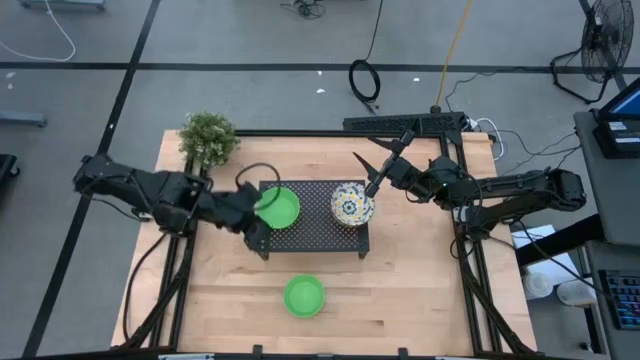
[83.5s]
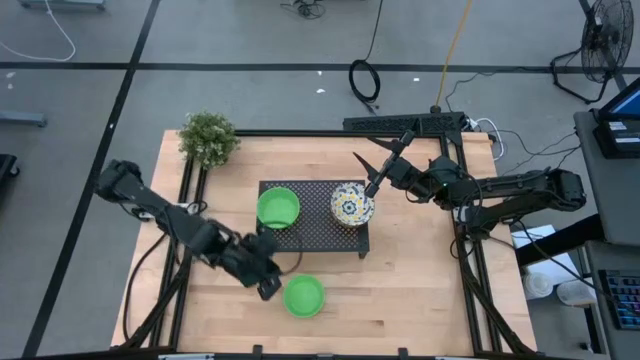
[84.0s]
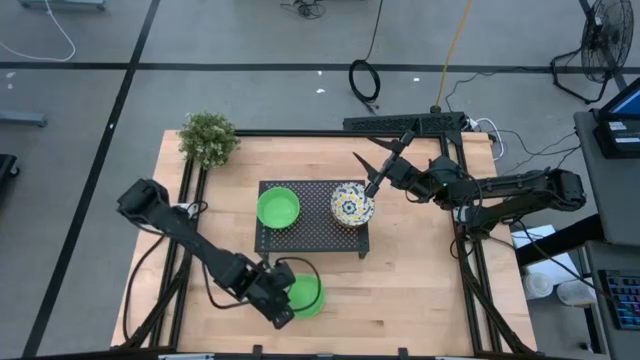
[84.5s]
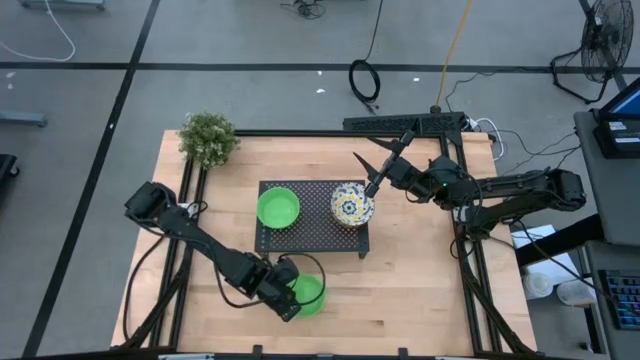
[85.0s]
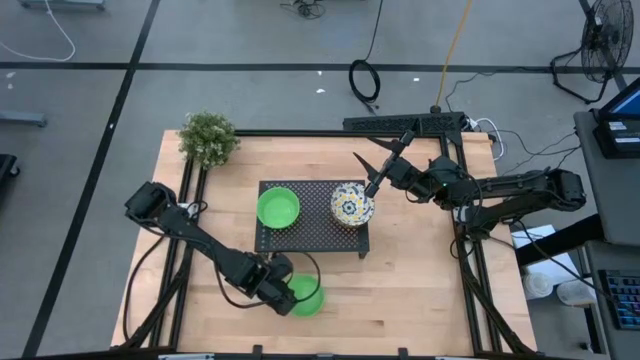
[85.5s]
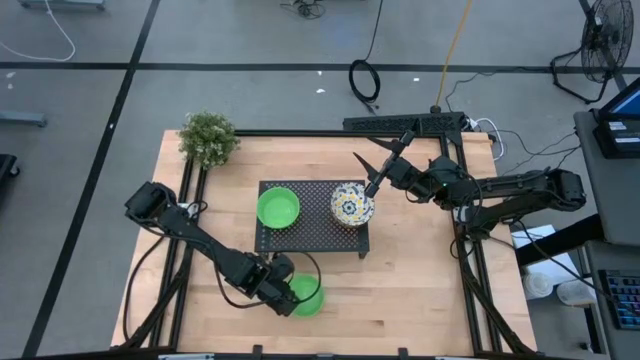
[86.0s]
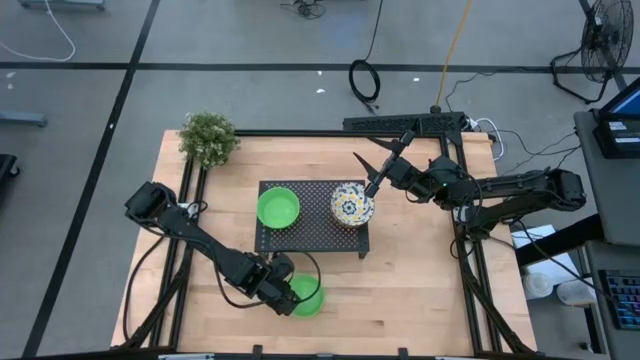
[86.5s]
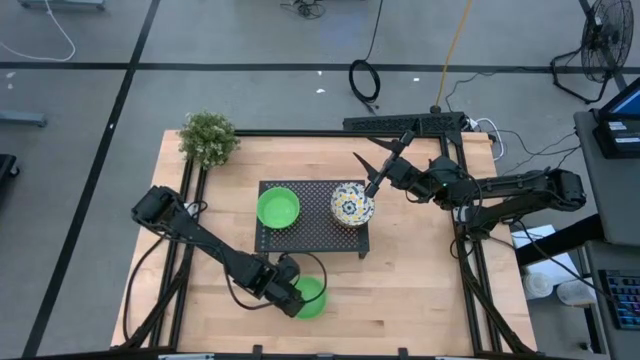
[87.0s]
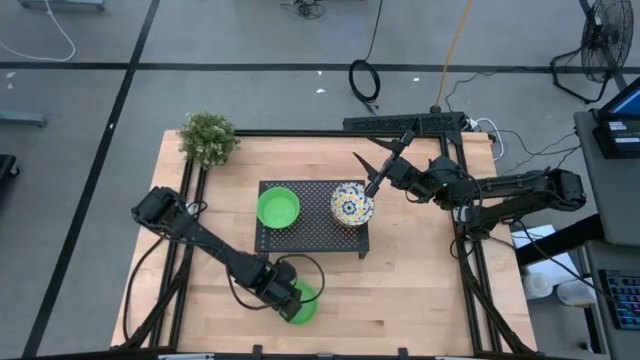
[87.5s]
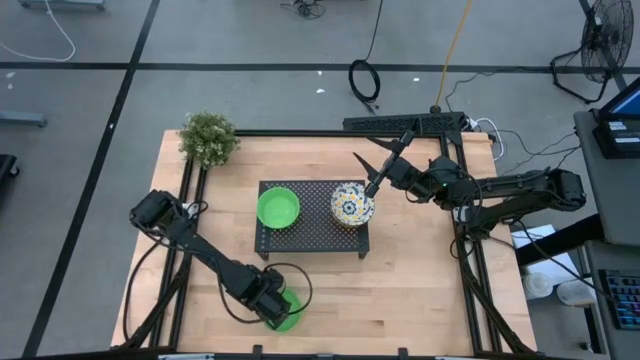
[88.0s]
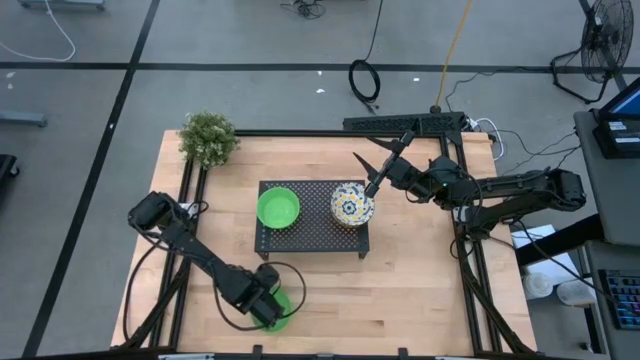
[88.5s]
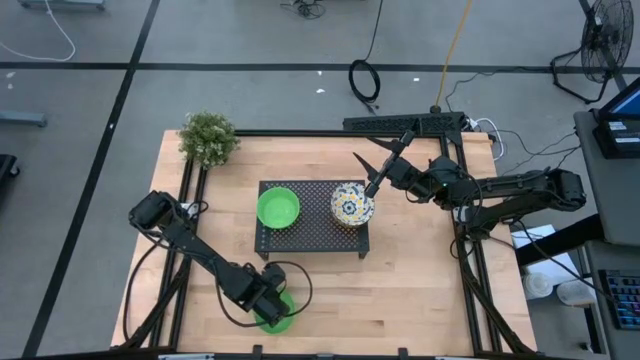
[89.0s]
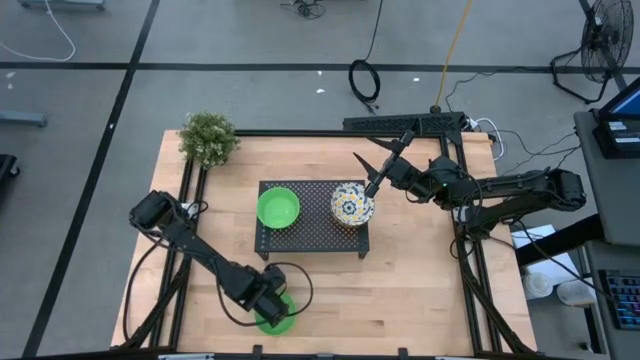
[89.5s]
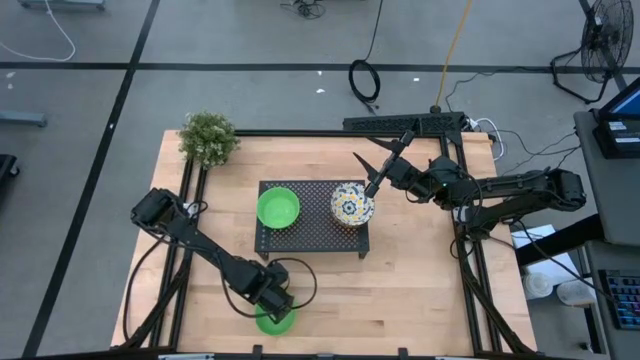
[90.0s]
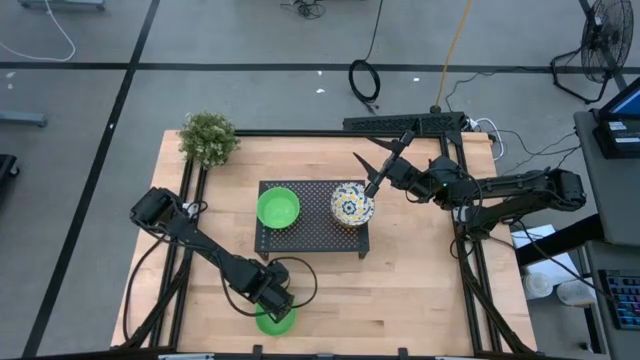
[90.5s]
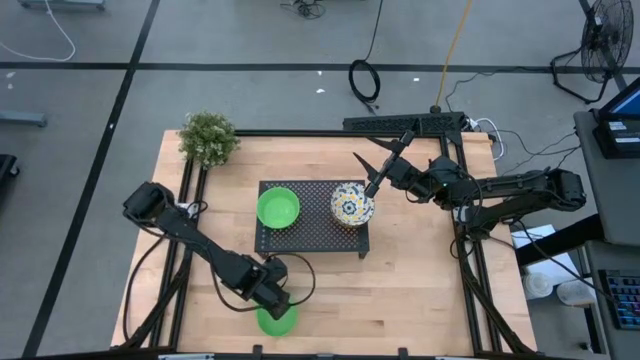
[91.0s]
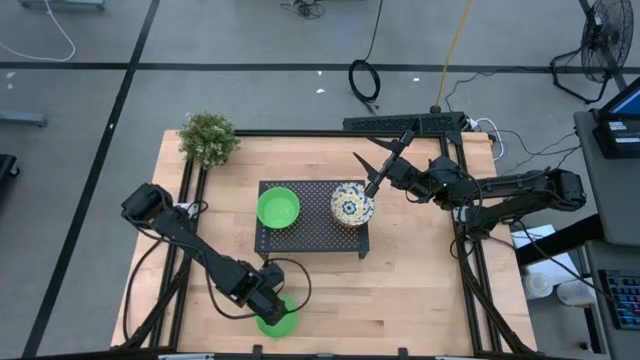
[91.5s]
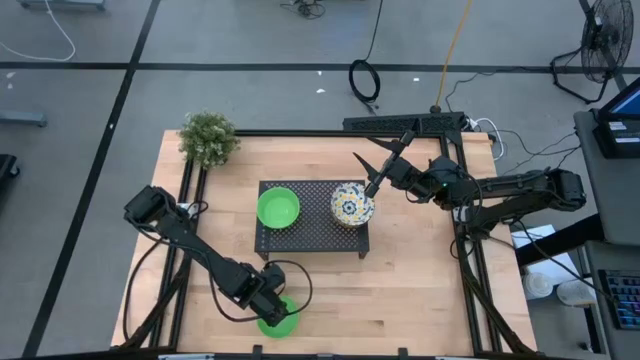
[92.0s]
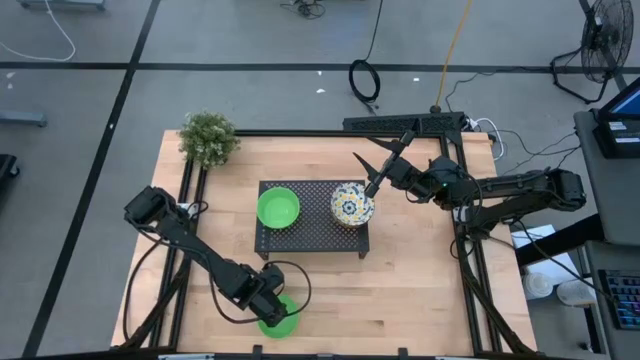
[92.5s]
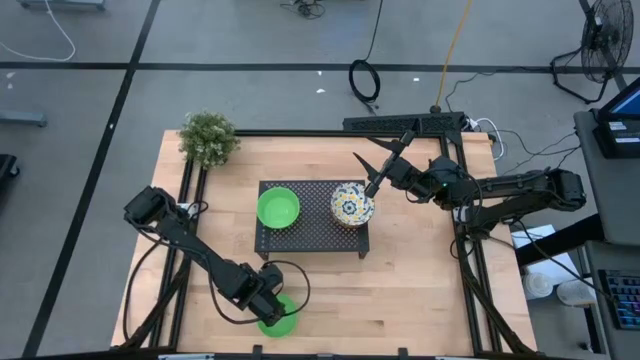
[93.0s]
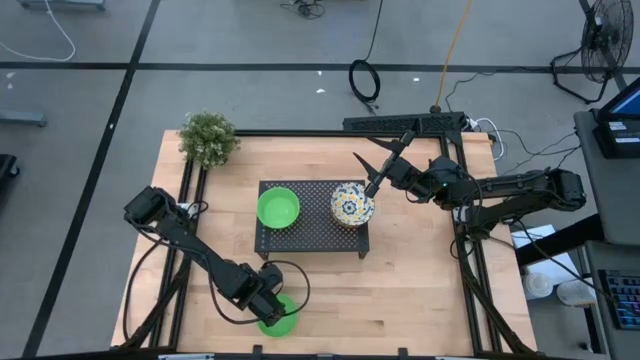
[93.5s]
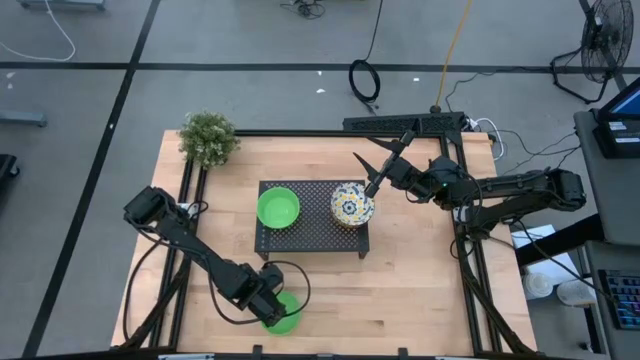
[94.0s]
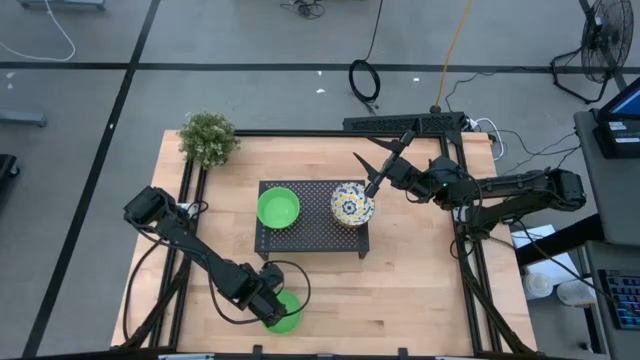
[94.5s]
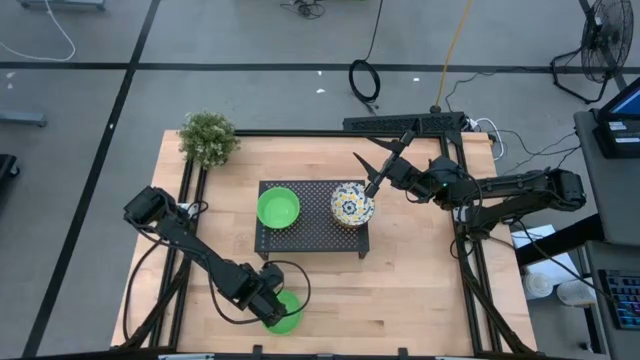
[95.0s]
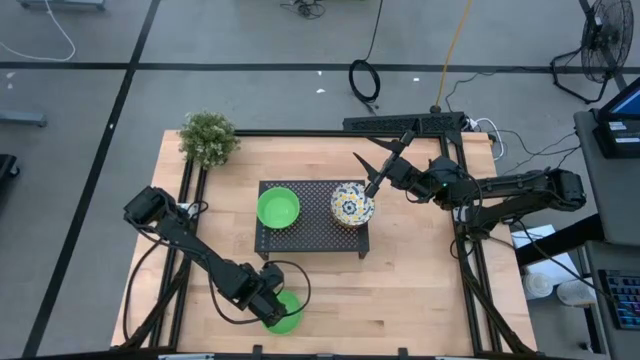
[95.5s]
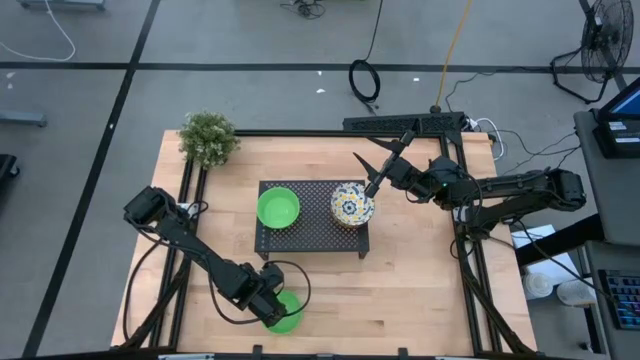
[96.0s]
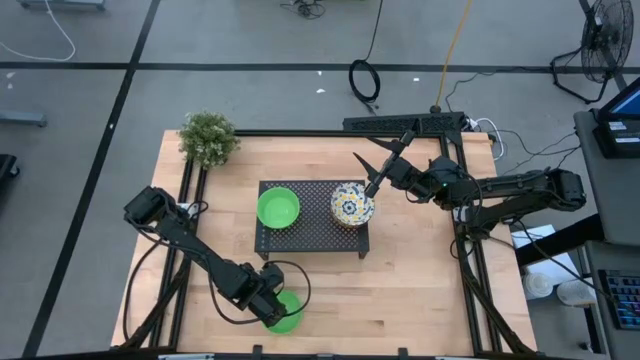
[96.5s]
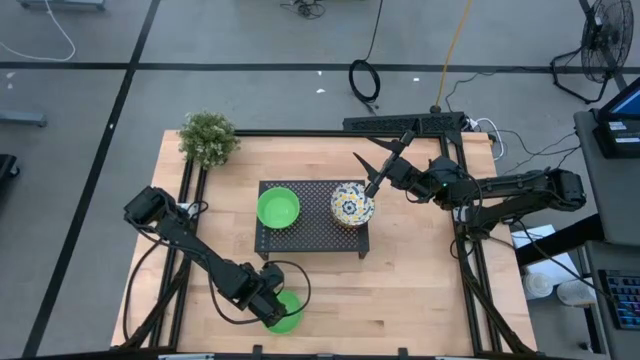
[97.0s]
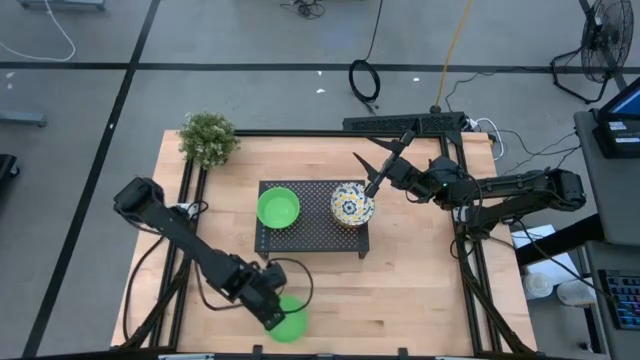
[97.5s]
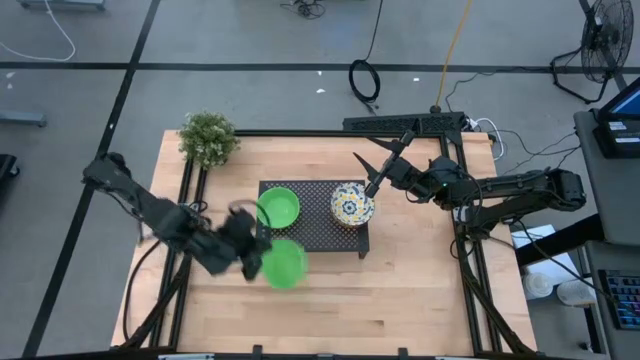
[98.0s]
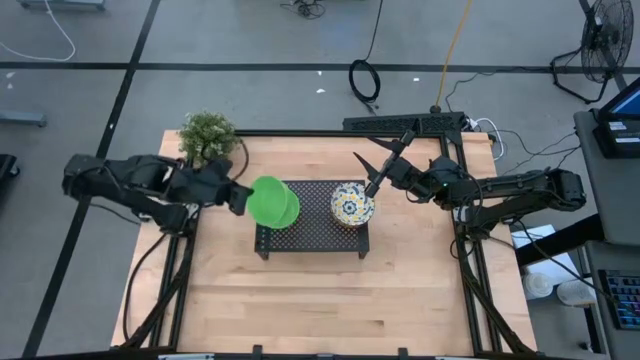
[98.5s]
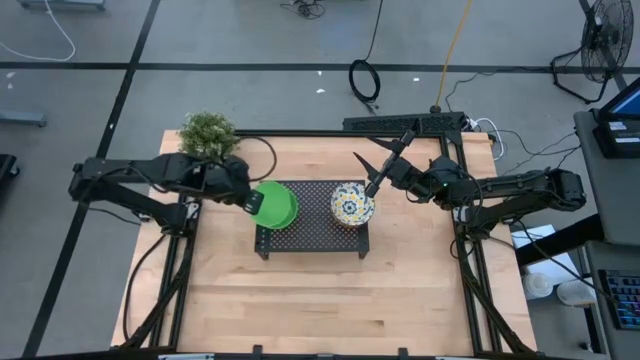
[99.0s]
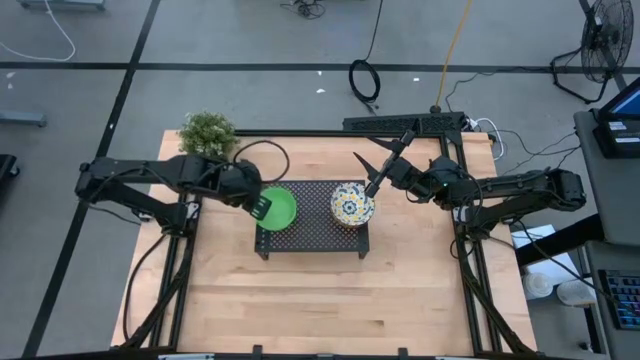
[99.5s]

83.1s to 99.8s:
Task: Pick & Place Mini bowls
Stack the green bowl on top of the green bowl on the shelf

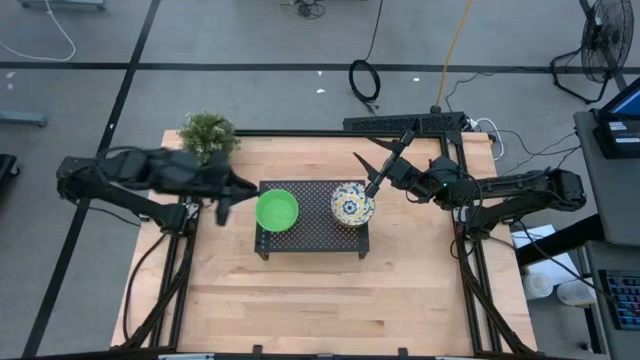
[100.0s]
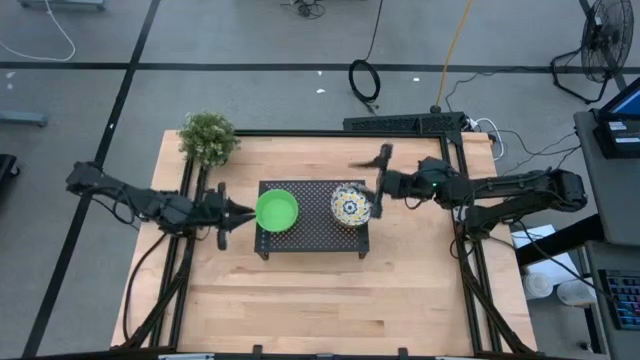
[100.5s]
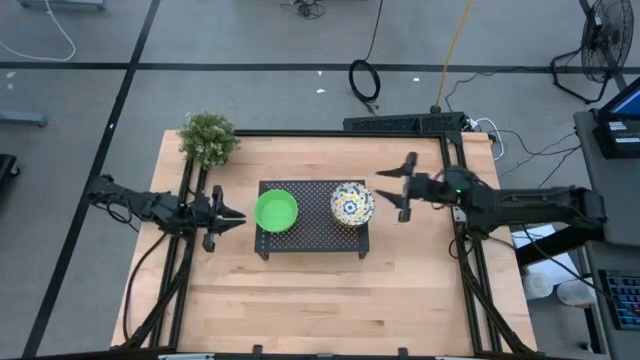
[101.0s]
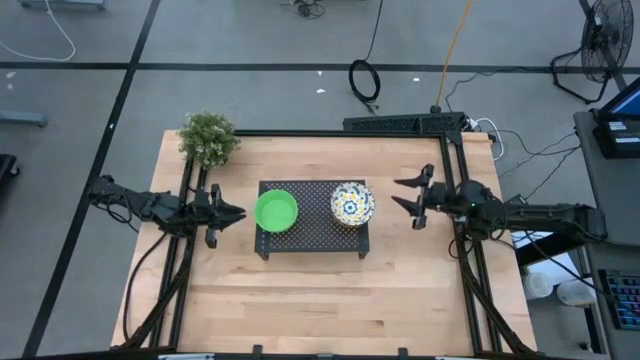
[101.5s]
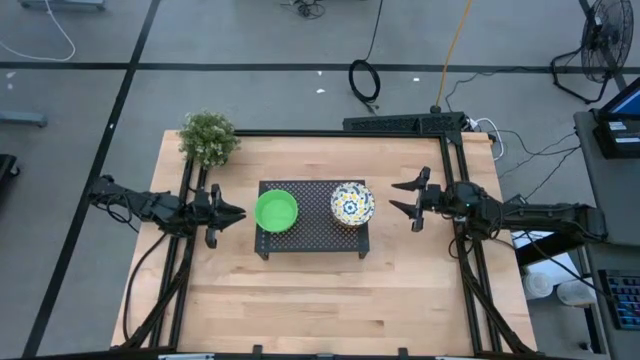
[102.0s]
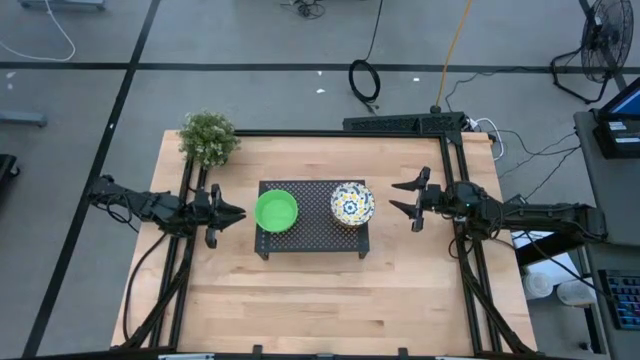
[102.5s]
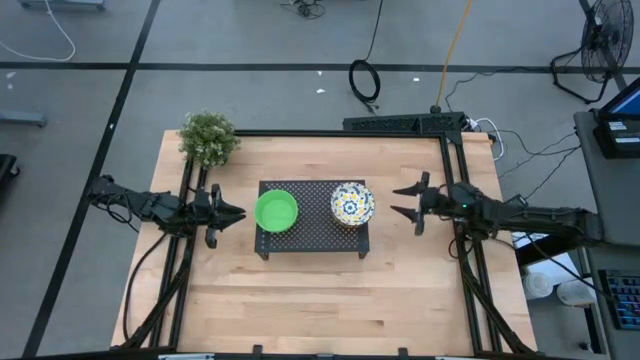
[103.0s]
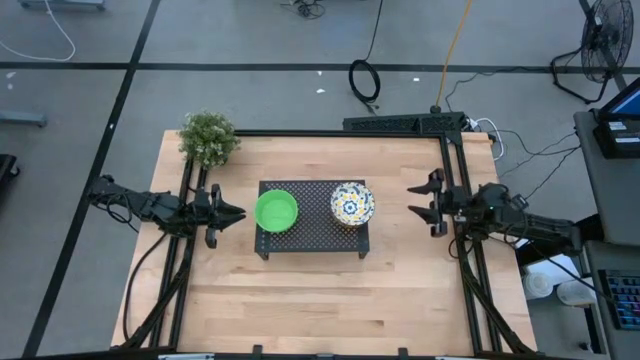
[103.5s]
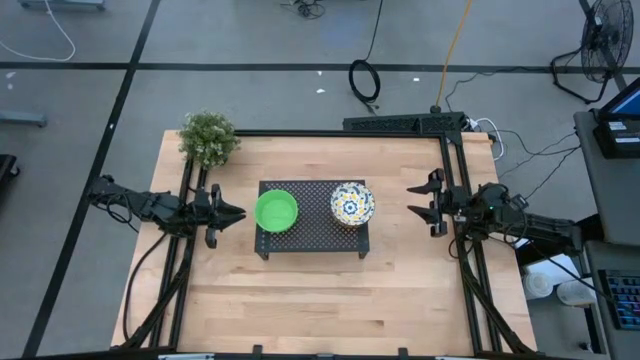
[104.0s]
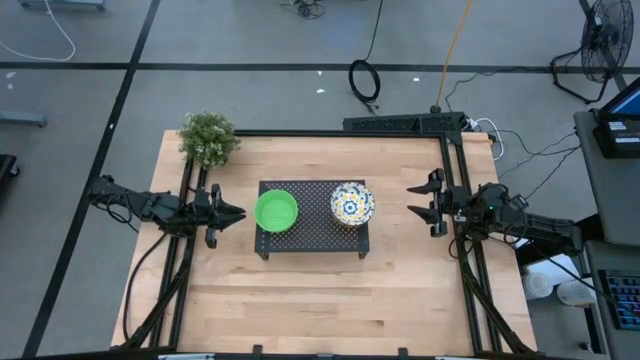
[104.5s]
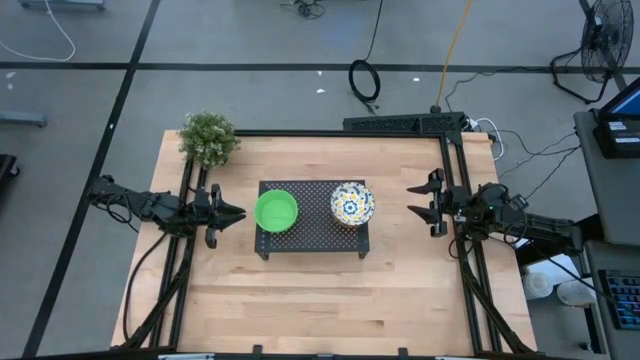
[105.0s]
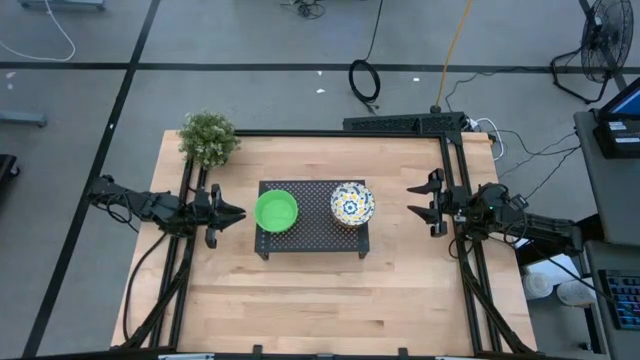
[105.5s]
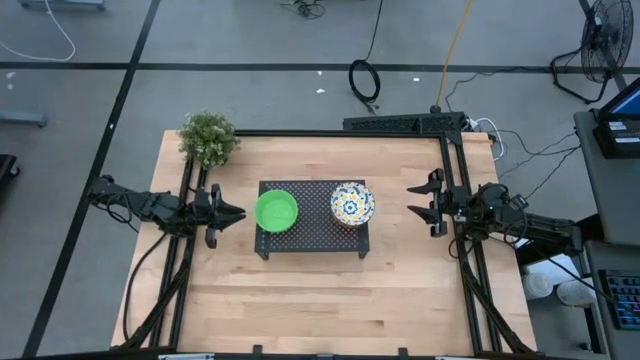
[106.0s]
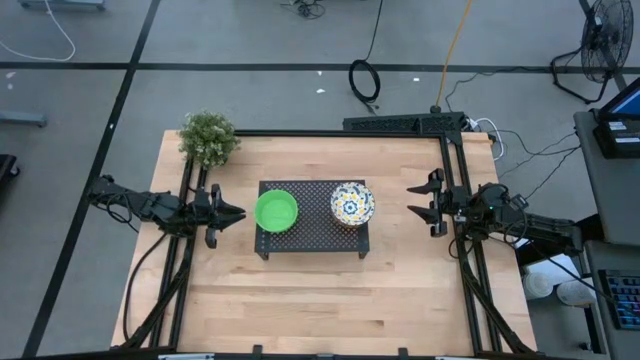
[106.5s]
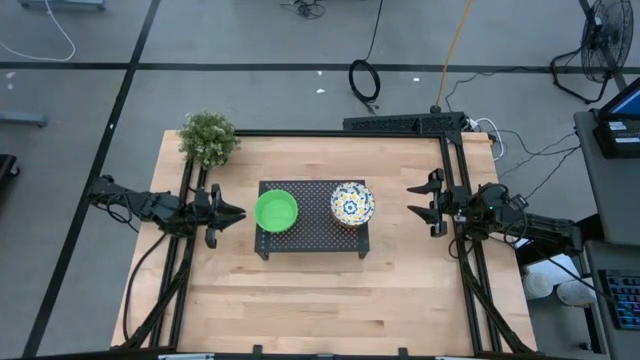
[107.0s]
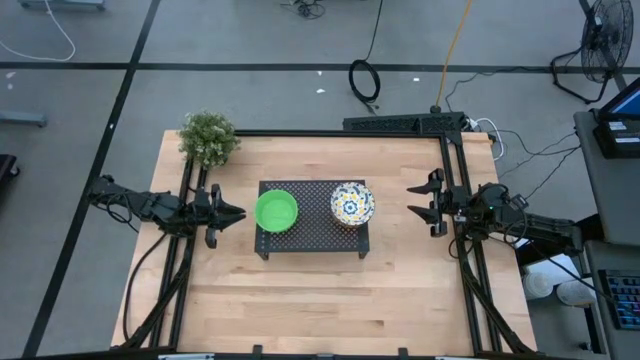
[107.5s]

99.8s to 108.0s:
Return to Home Position
